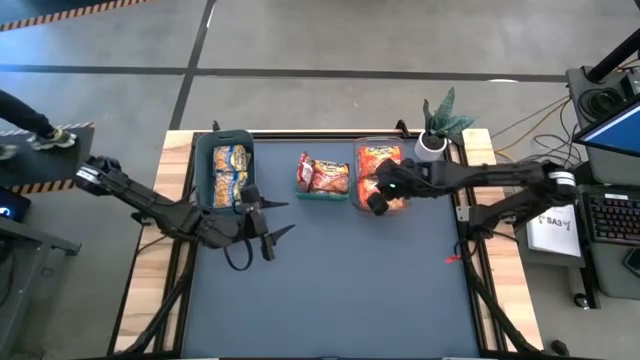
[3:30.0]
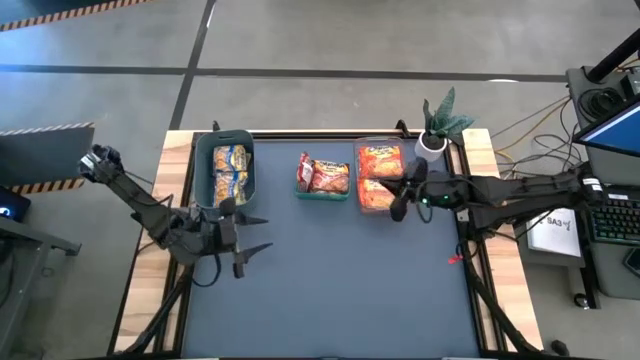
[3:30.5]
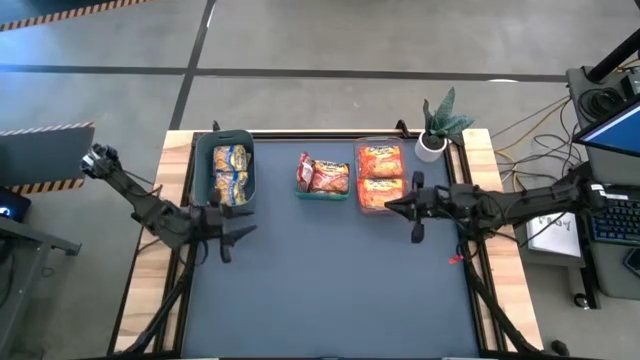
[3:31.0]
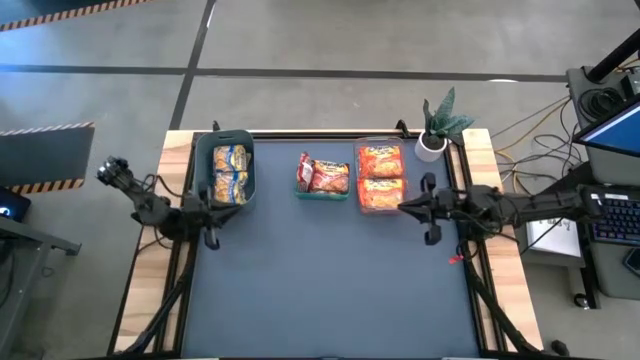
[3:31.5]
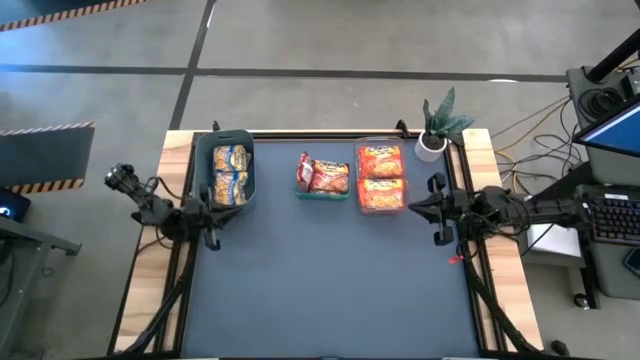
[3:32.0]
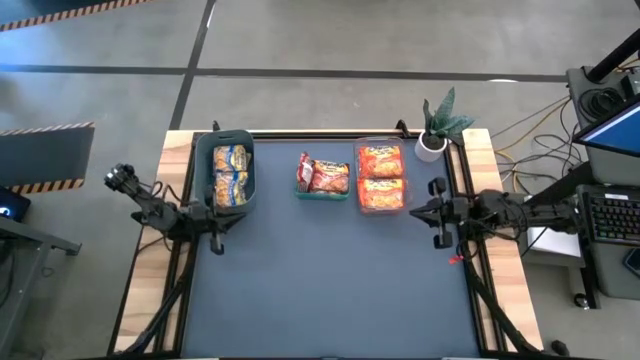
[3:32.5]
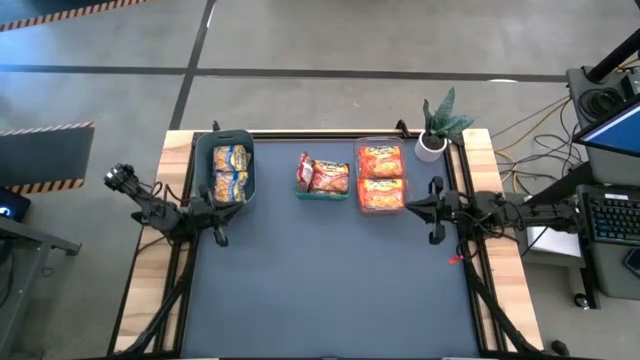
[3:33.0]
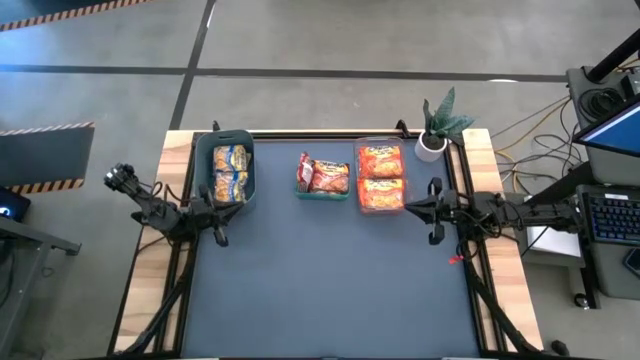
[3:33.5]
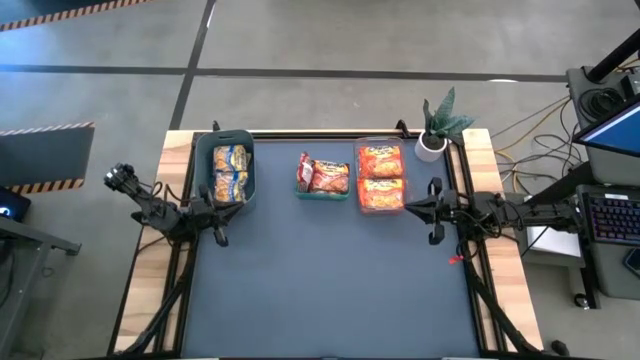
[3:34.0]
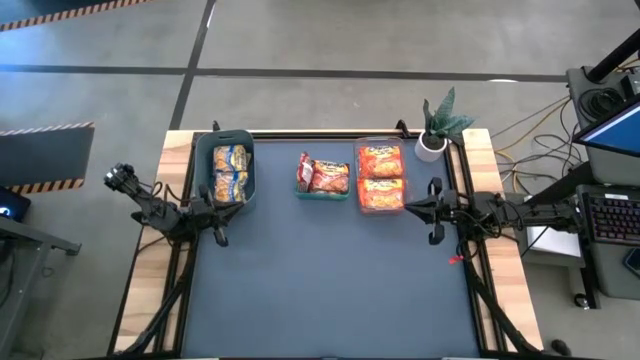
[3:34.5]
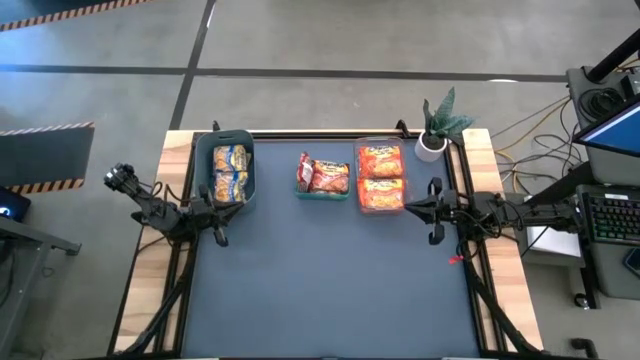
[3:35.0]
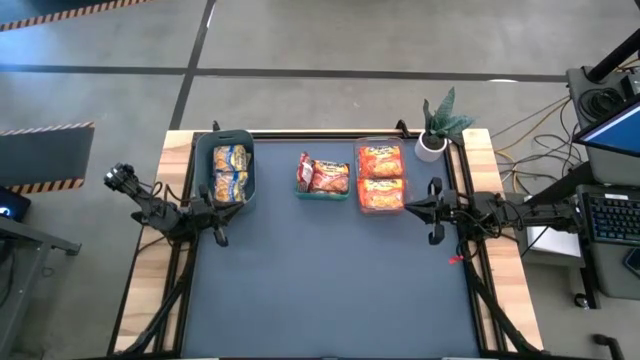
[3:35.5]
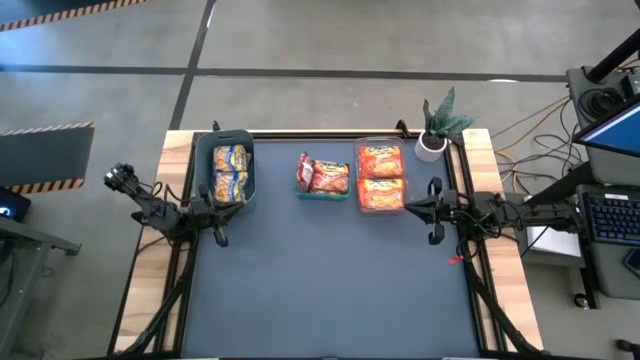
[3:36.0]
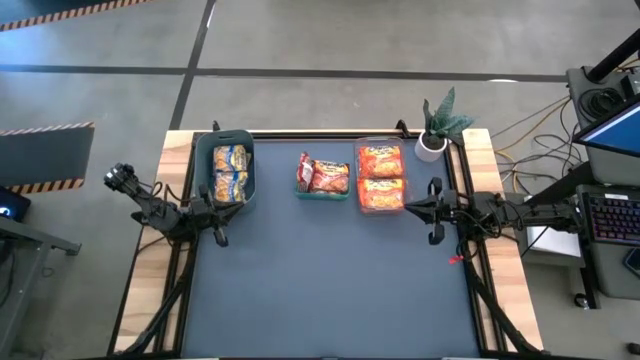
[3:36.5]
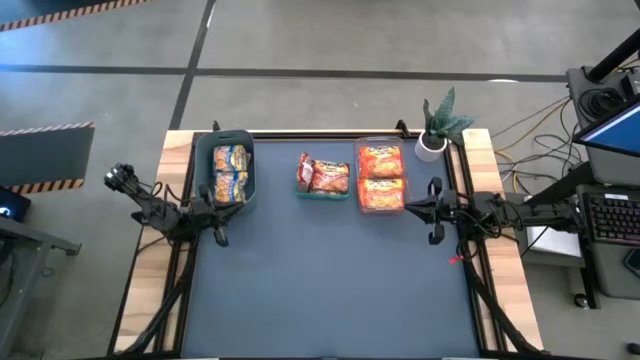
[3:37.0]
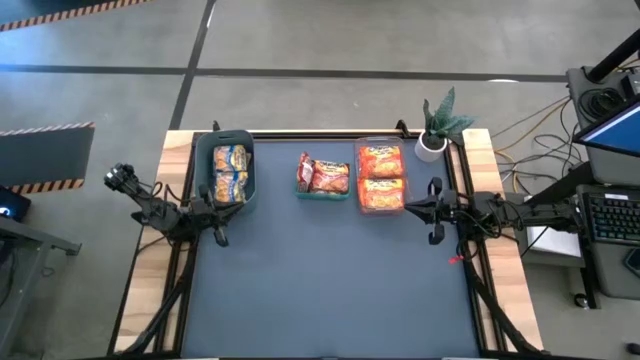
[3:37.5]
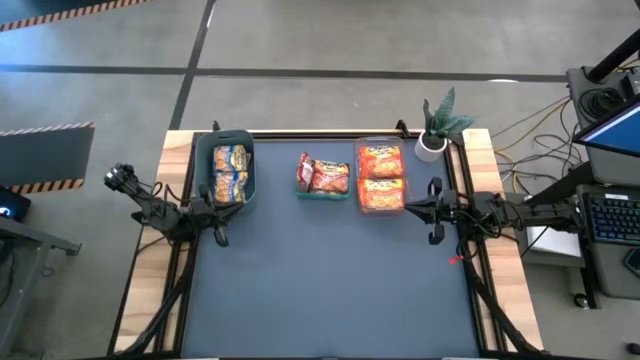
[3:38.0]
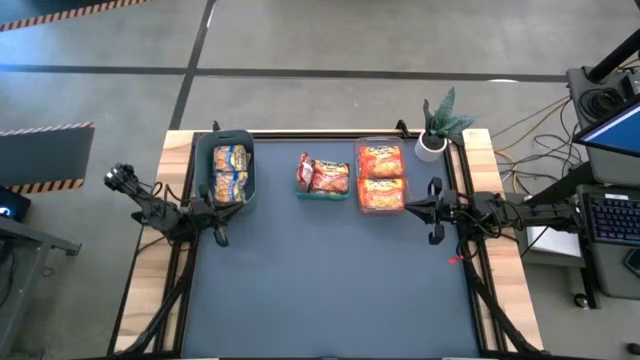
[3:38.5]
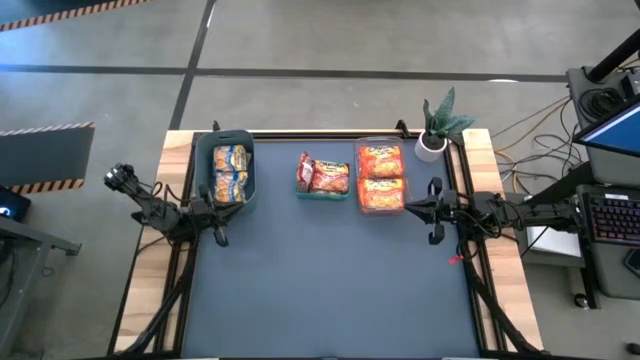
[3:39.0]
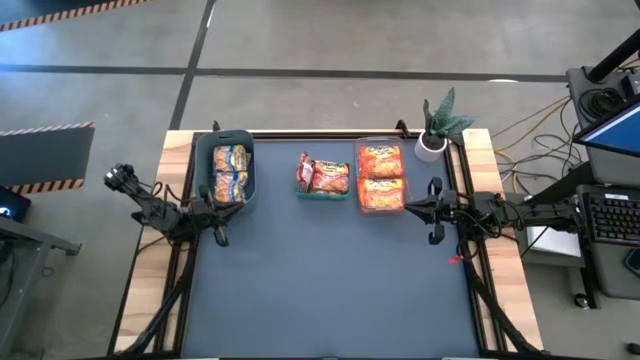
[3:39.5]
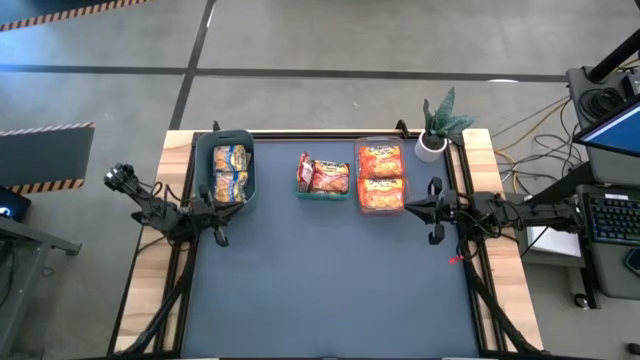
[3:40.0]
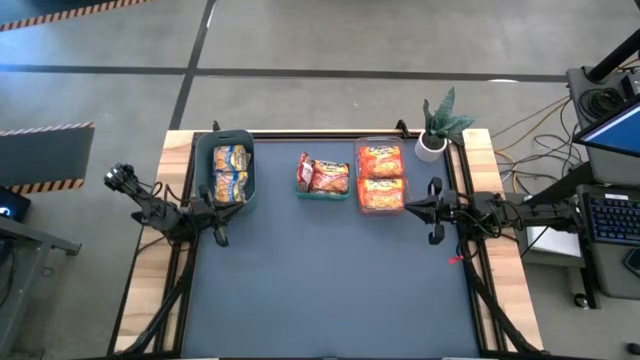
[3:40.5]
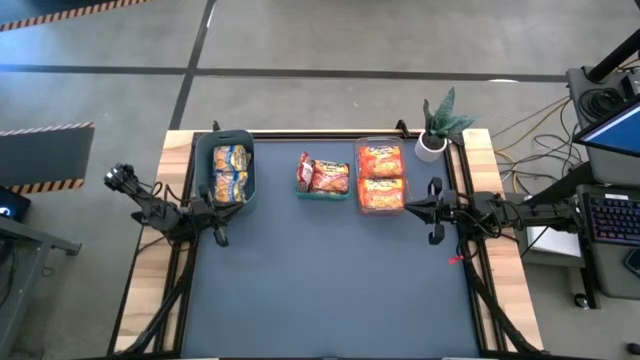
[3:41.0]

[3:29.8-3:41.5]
Task: Sort Maruchan noodles
Return to Home Position

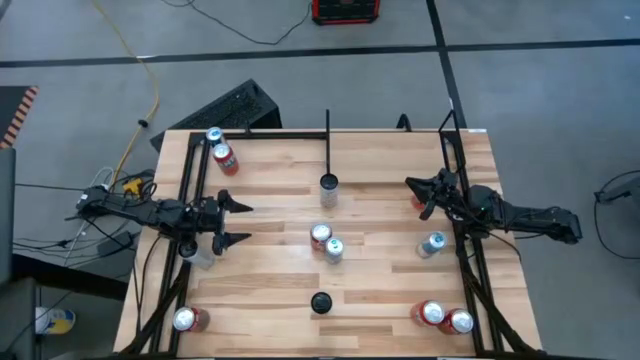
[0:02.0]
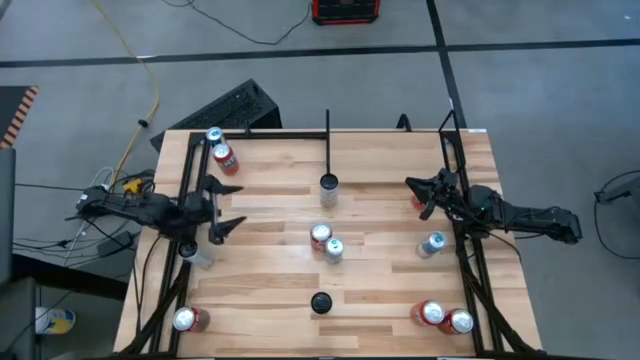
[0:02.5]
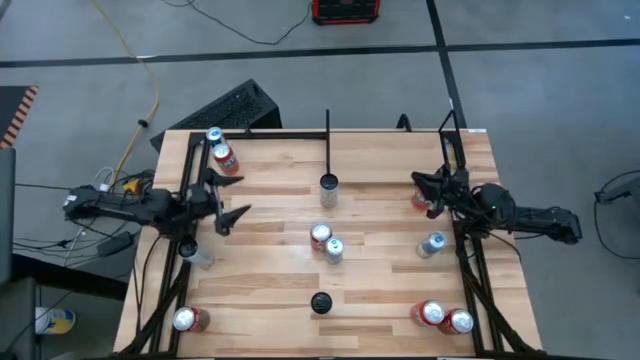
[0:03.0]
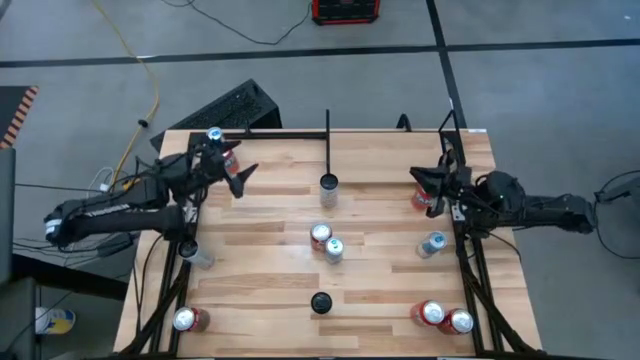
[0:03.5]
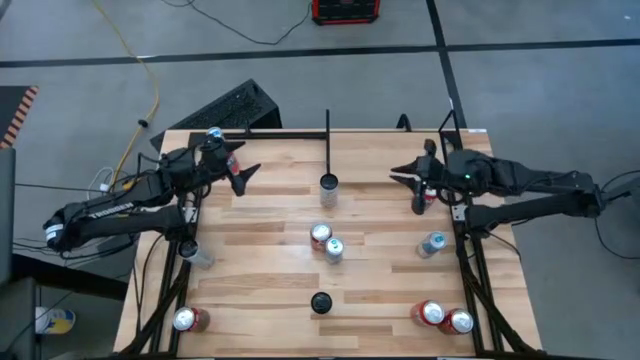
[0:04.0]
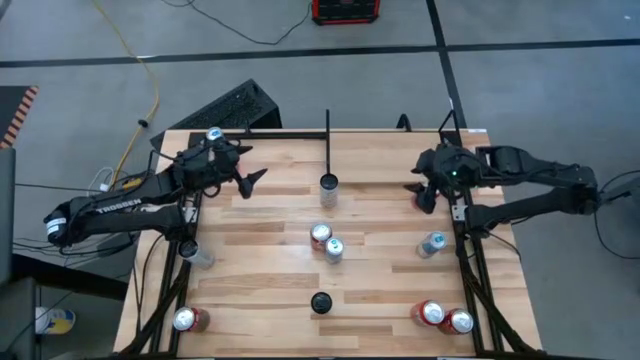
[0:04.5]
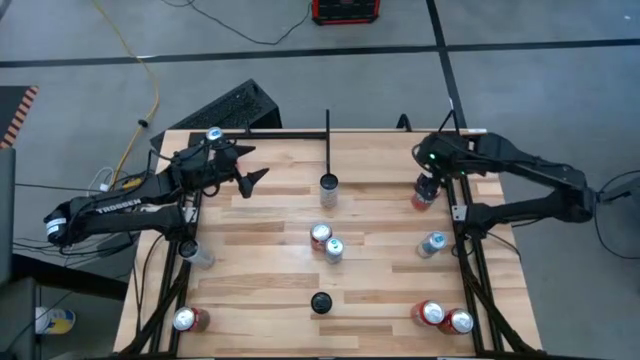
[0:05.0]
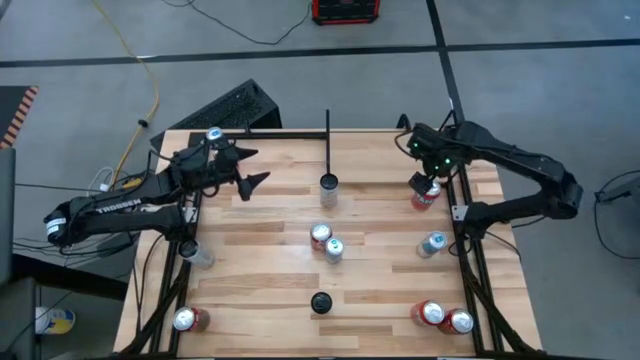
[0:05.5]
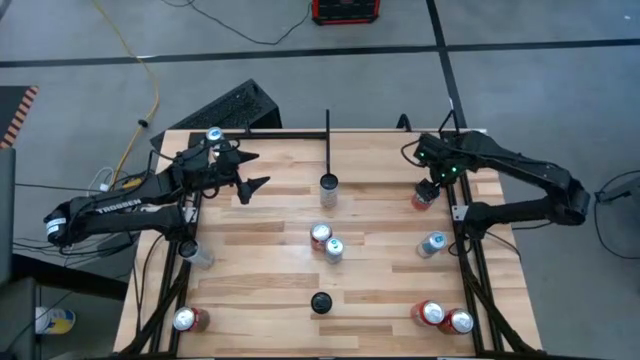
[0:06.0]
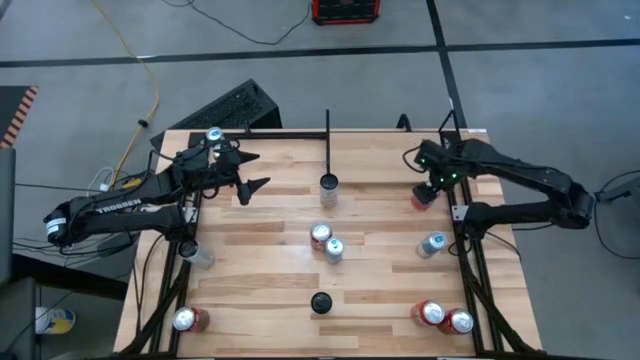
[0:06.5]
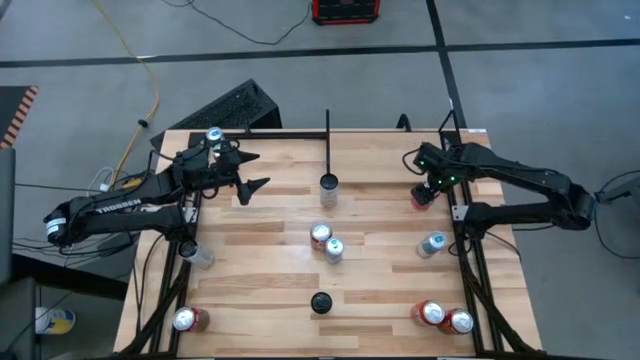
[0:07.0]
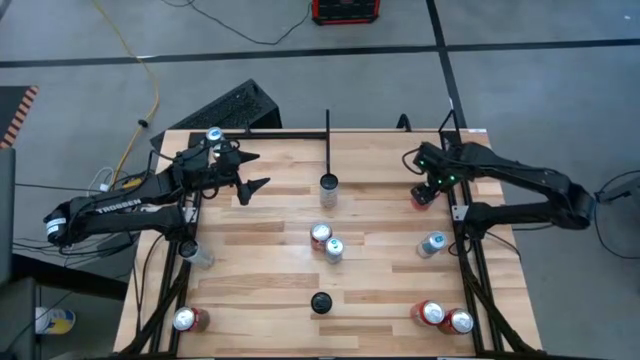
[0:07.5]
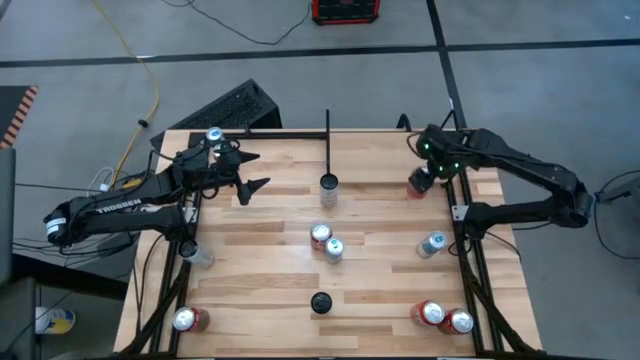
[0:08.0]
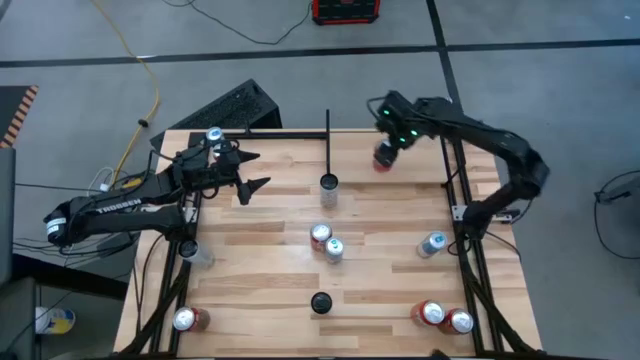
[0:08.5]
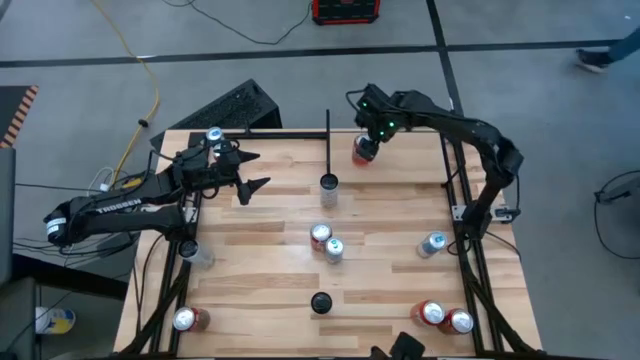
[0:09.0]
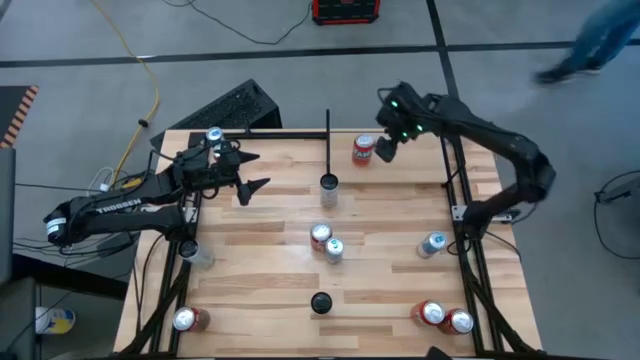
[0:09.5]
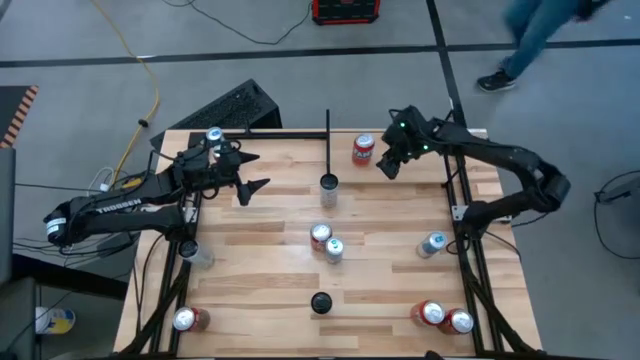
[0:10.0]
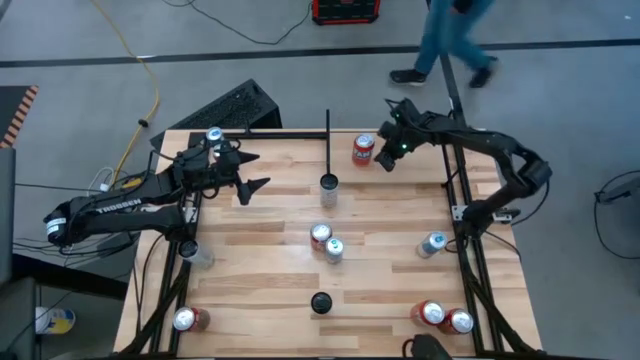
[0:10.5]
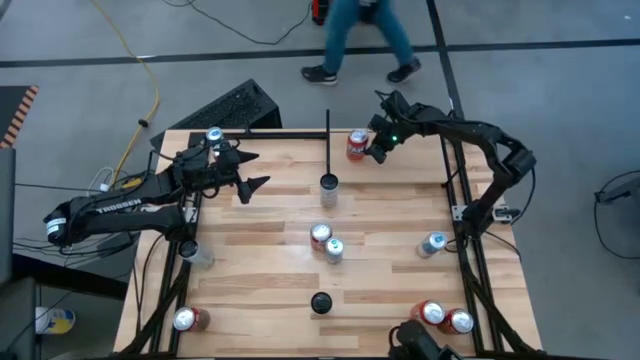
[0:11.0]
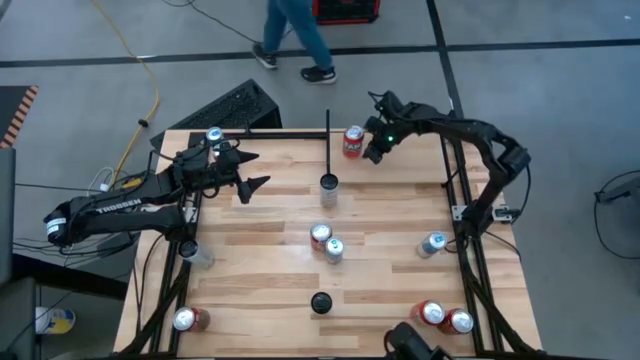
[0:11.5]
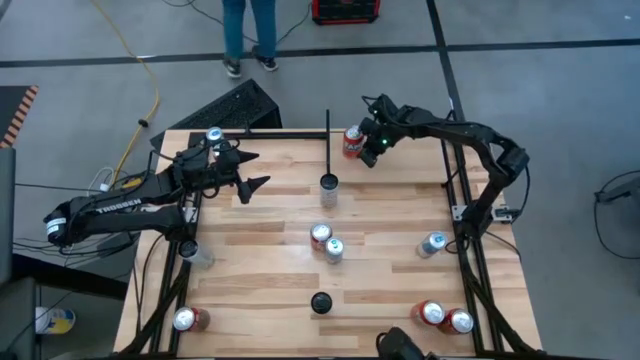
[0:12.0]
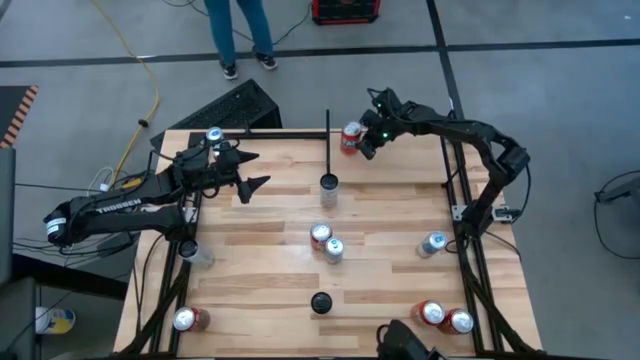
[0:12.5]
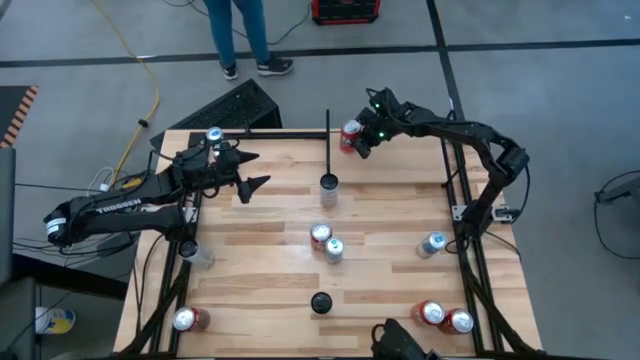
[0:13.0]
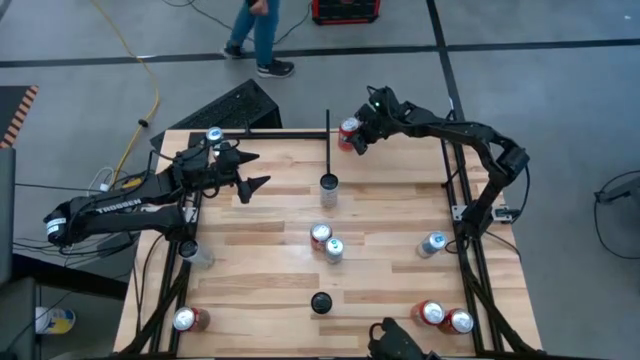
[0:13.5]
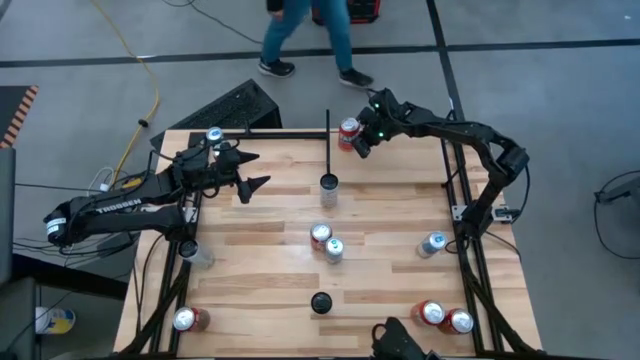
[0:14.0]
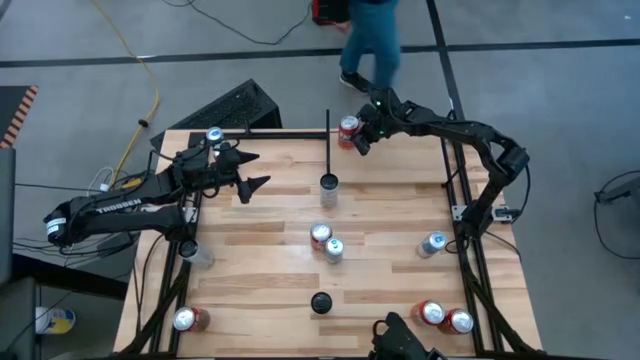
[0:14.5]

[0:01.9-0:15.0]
Task: Place canned beverage on shelf
Put the top right orange soda can on the shelf
